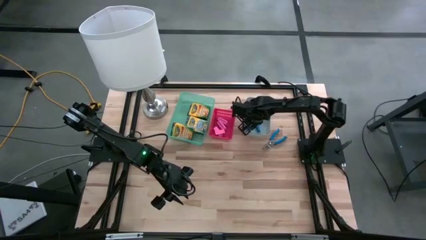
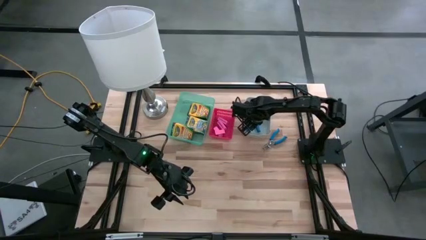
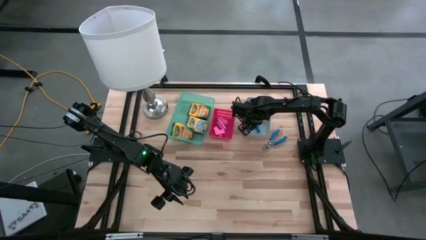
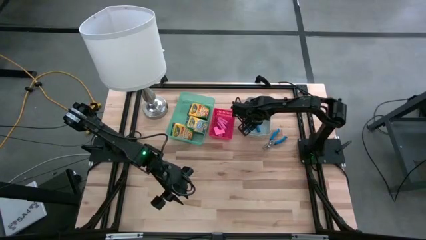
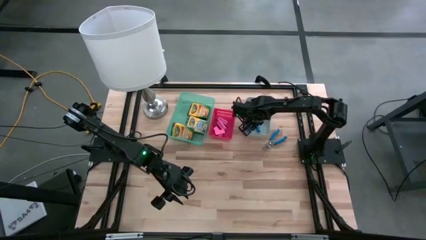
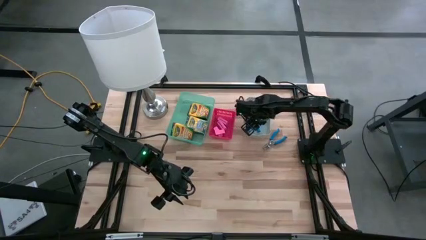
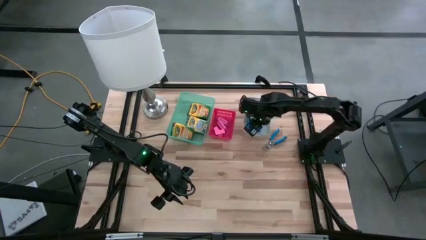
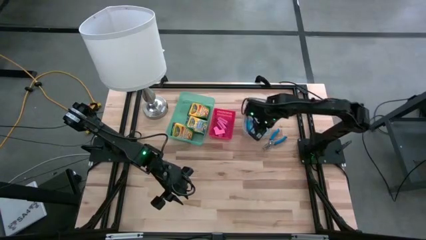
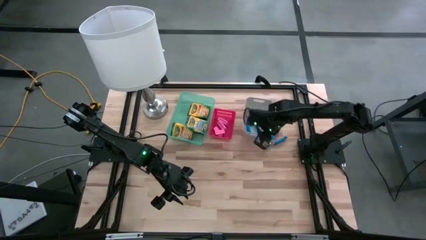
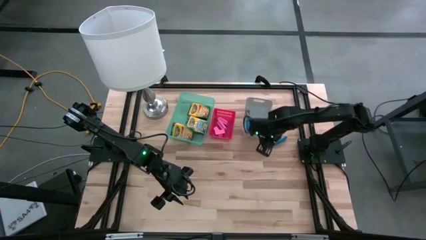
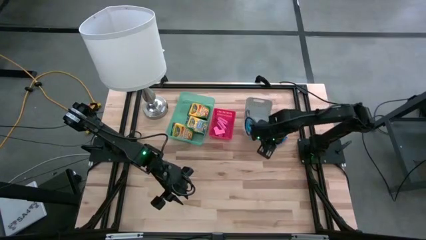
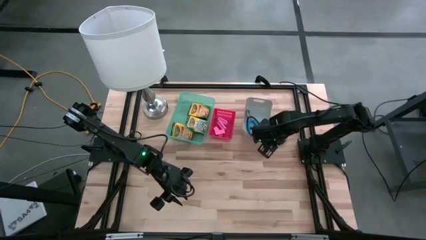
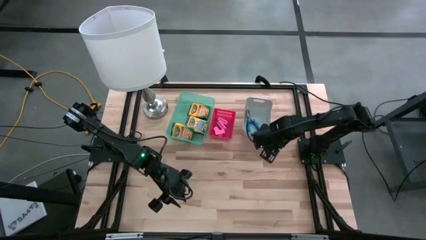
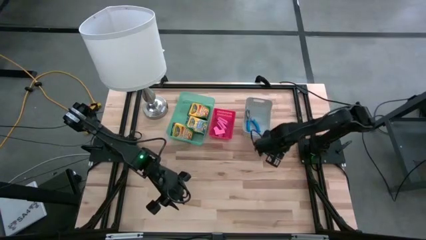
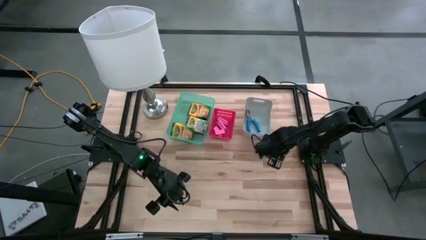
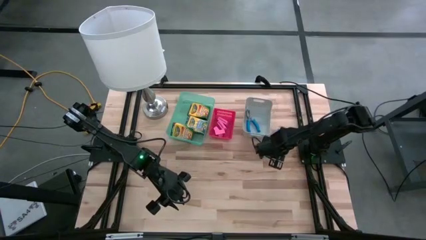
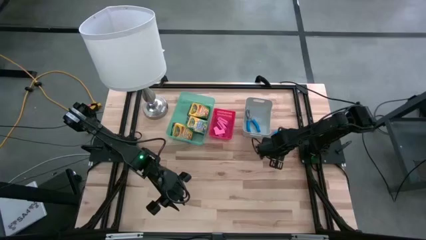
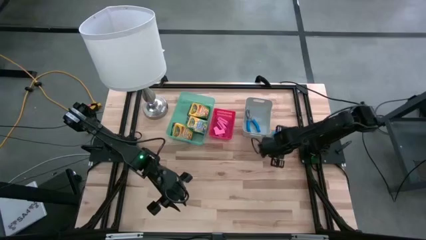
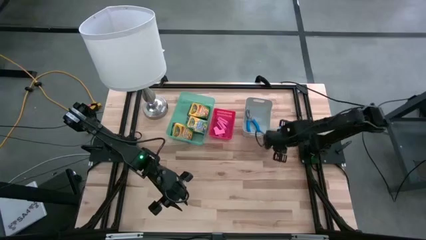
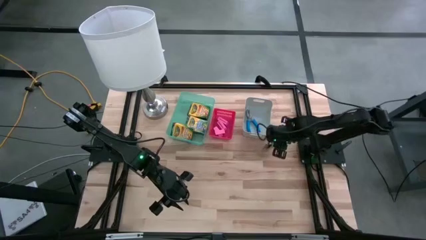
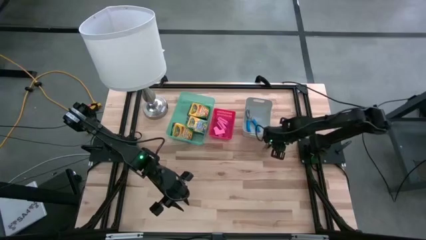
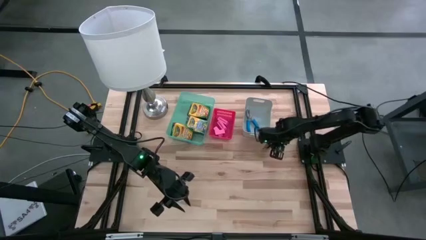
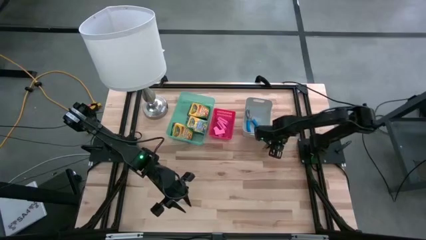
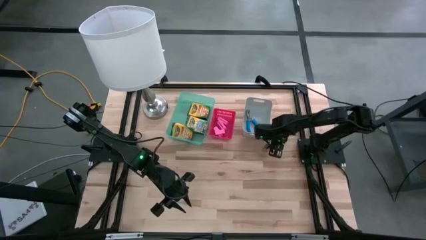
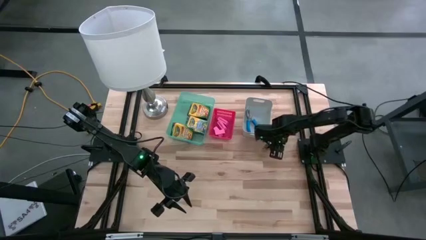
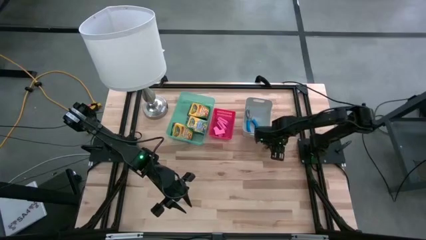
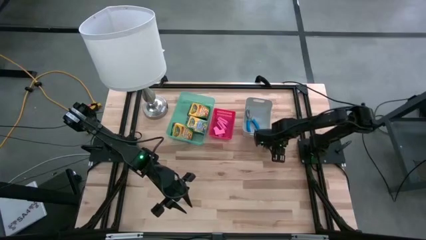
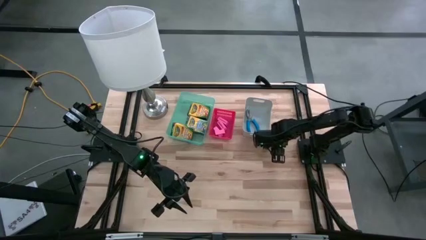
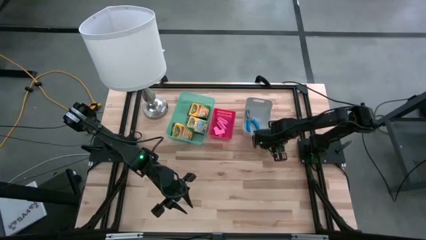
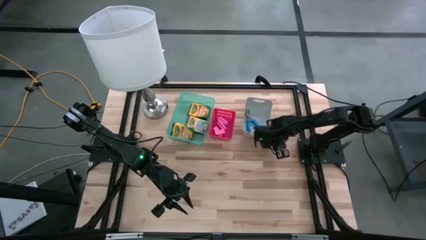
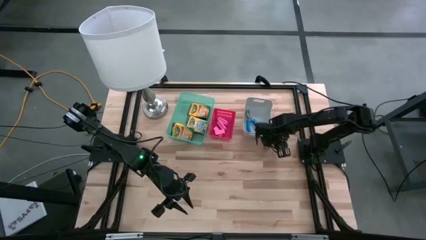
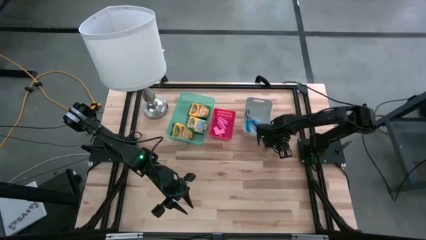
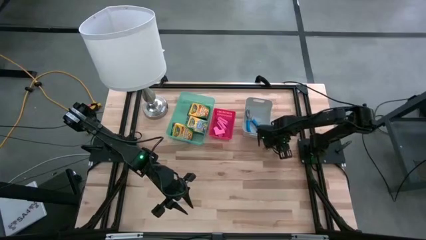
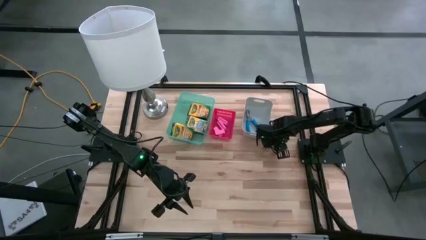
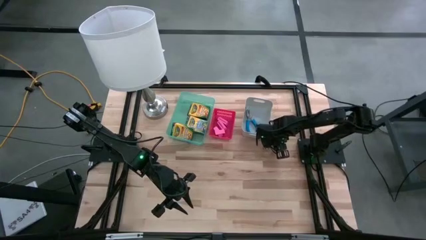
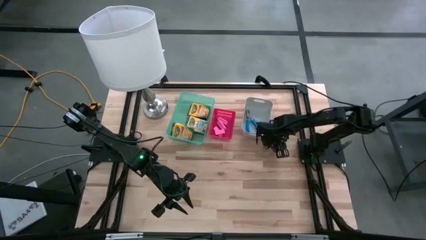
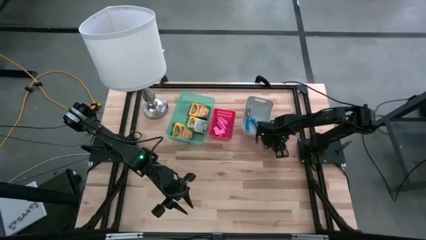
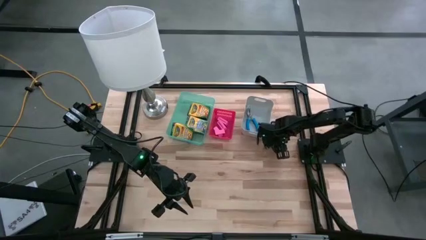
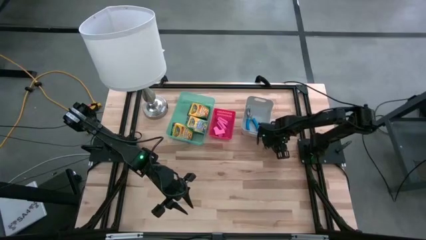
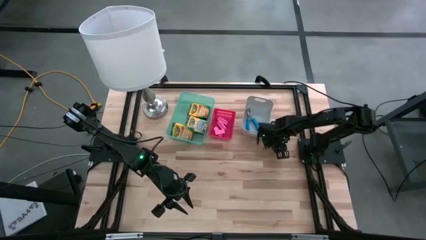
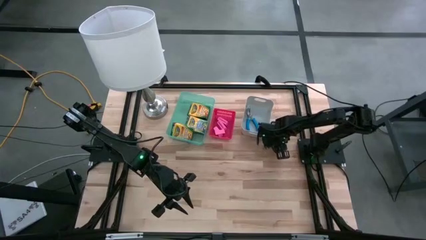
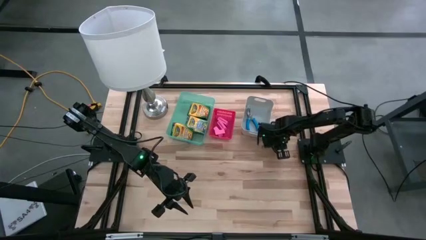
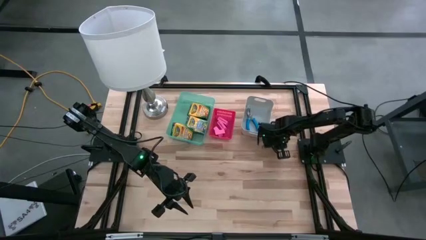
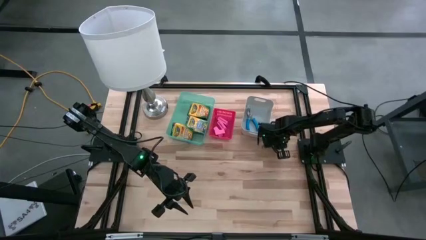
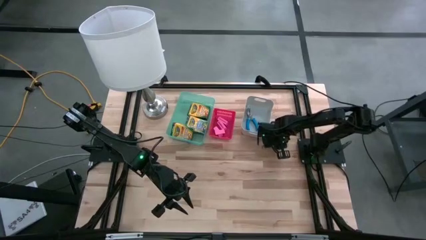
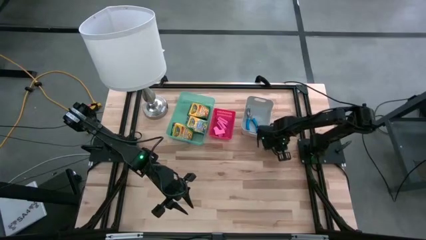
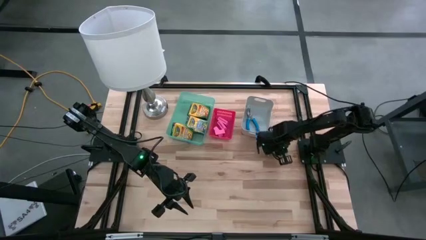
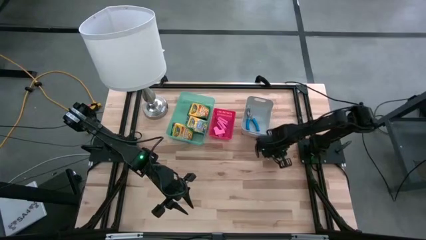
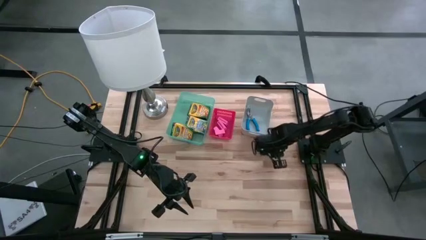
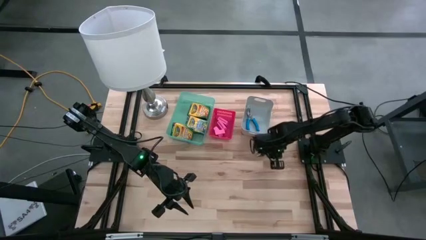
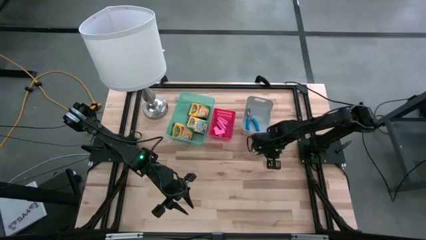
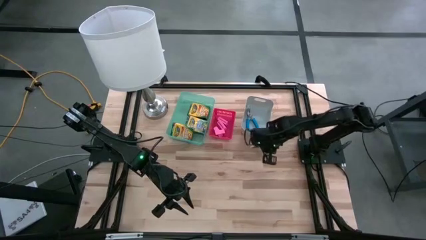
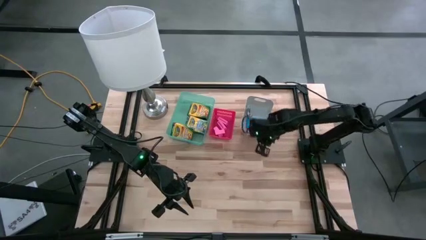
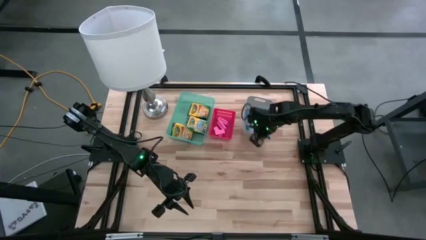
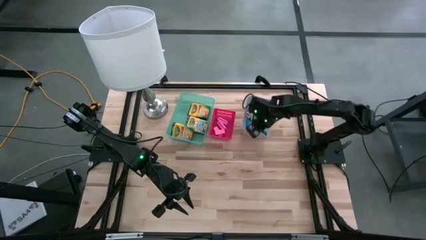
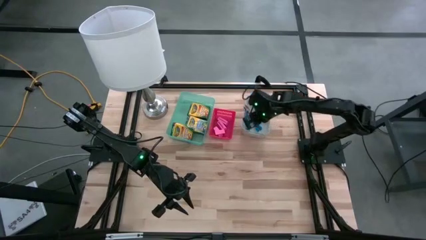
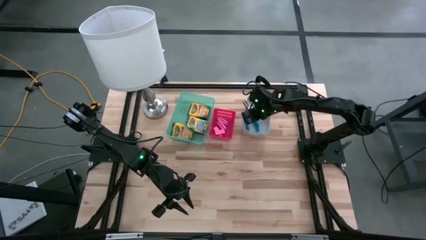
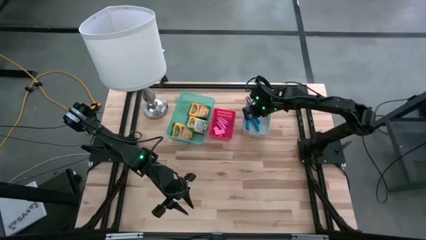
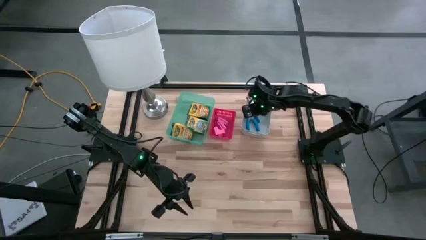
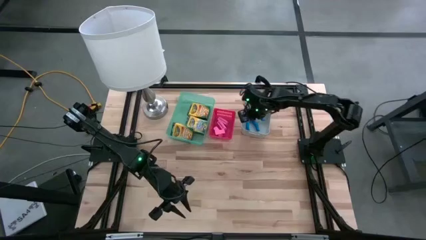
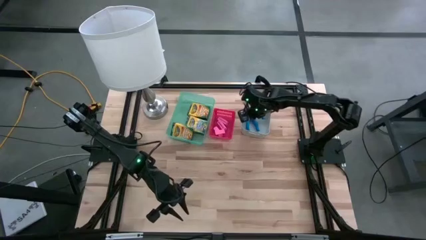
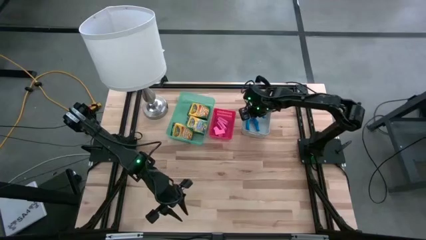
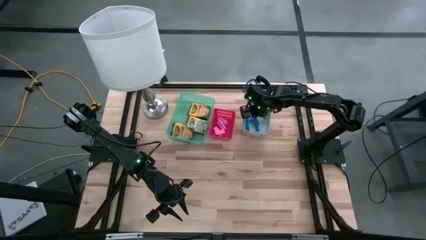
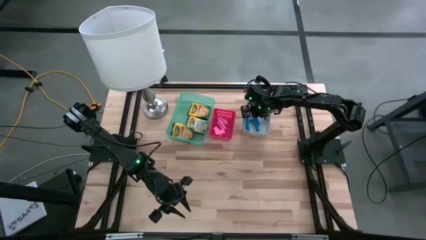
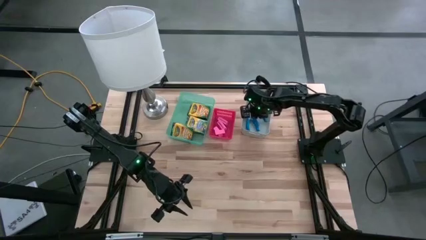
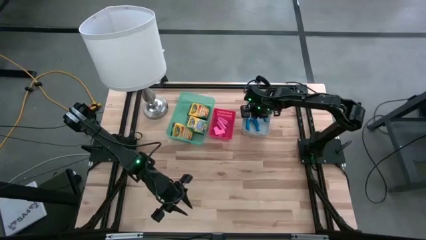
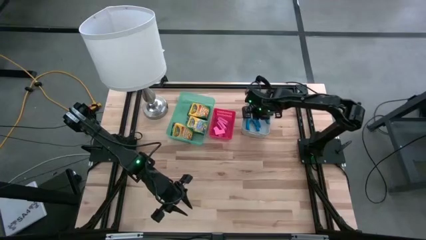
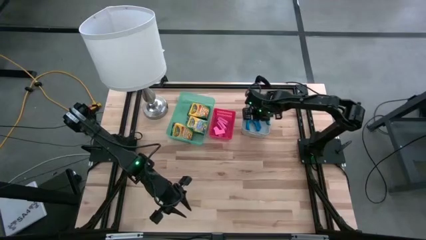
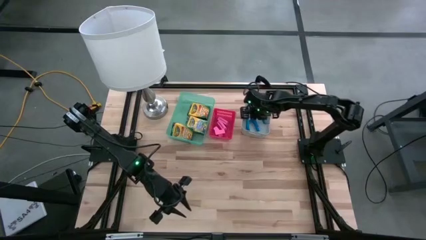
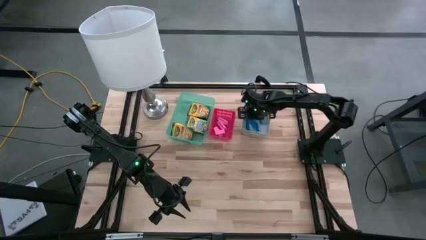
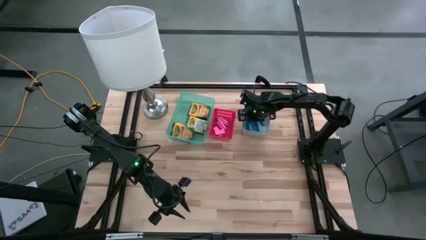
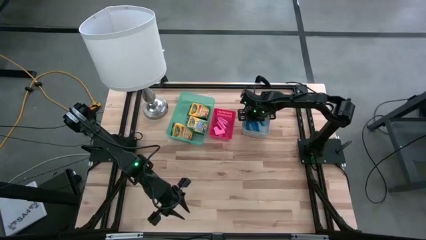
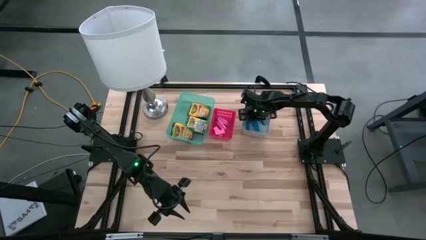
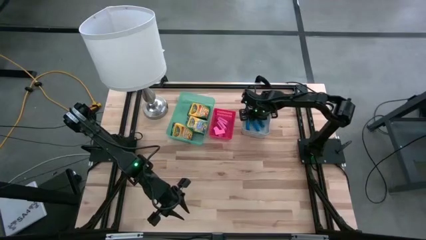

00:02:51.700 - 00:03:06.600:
Task: Pick & Place School Supplies
Put the blue puncher into the gray bin

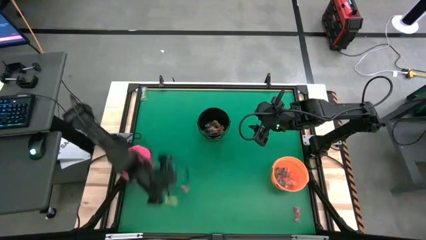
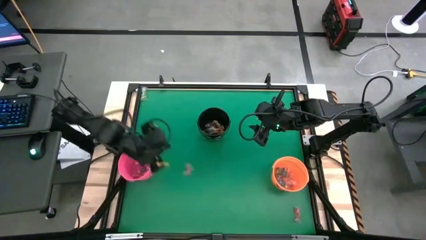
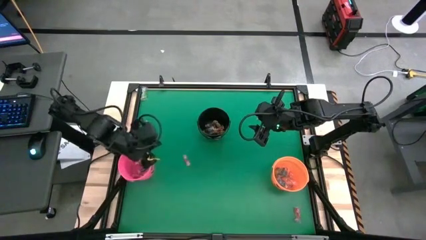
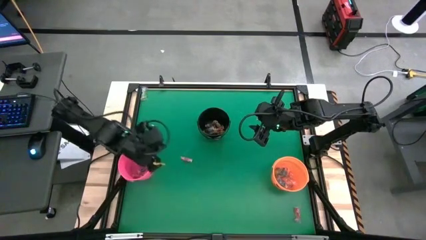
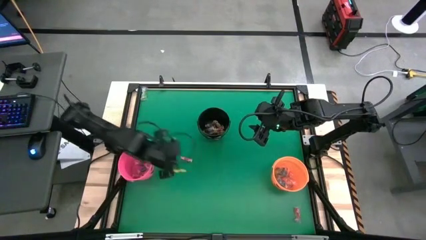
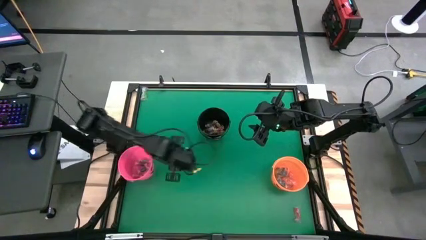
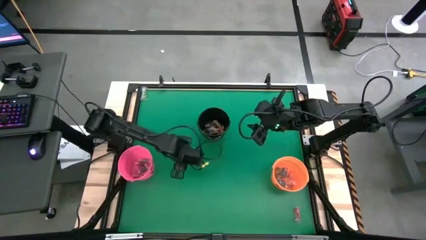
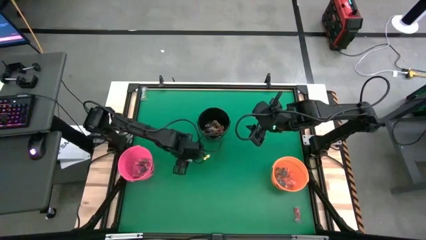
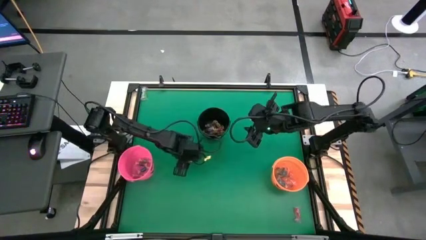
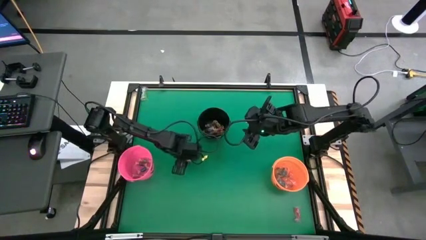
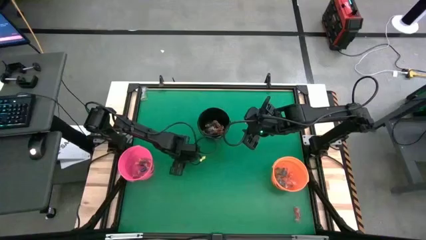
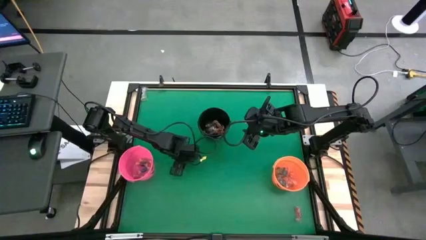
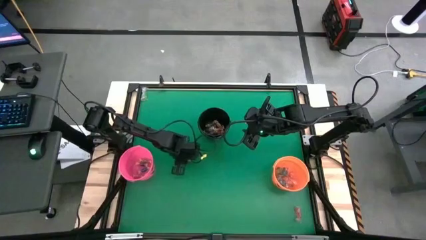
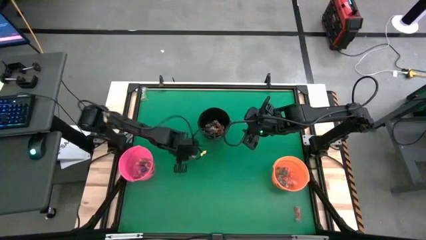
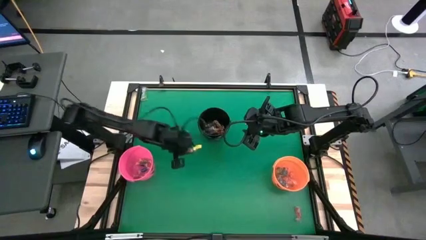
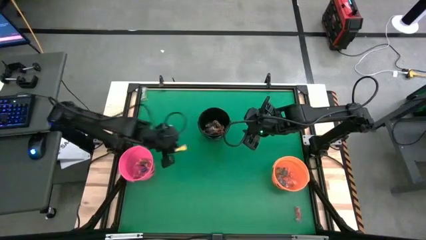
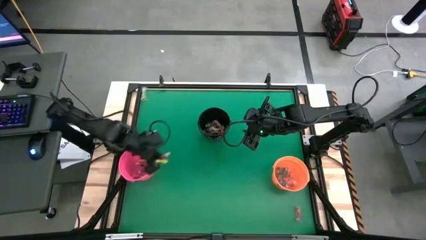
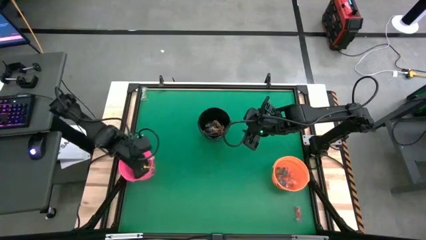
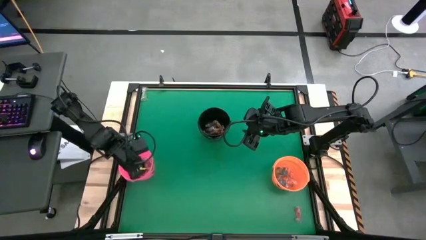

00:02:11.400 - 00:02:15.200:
Task: Sort candy by brand, put in halloween buckets
Put the red candy into the pink bucket
